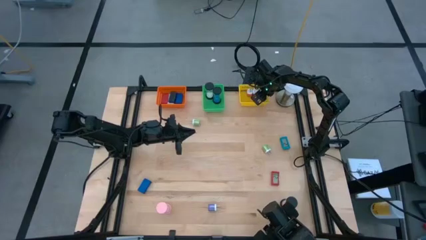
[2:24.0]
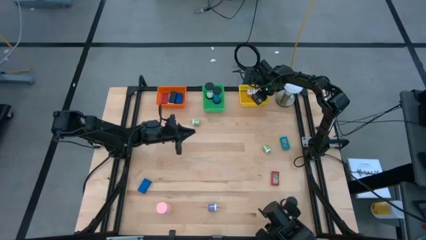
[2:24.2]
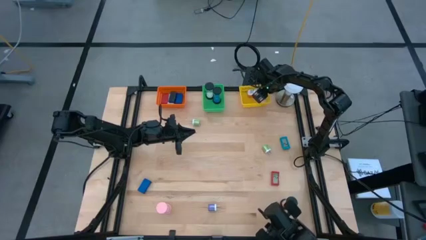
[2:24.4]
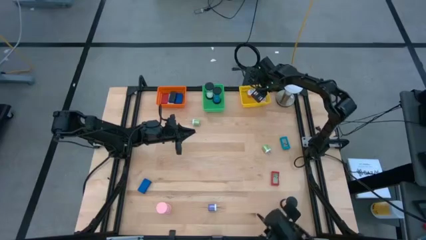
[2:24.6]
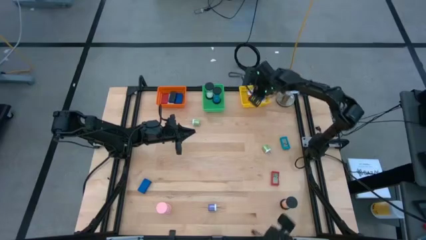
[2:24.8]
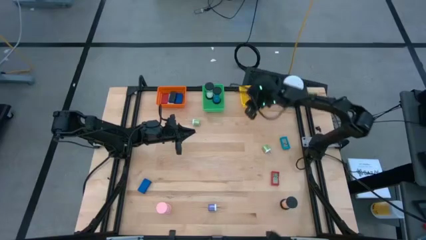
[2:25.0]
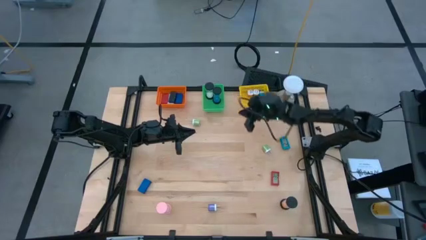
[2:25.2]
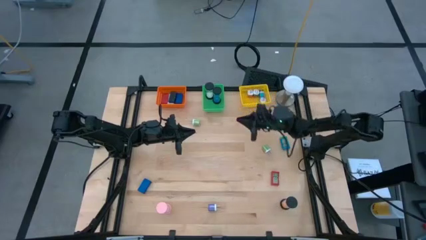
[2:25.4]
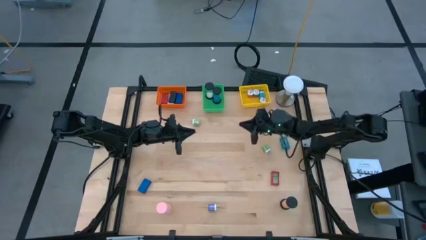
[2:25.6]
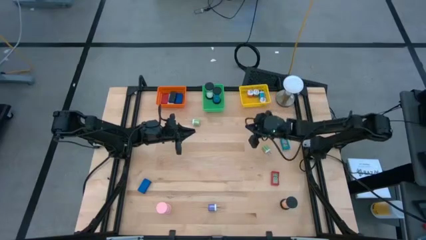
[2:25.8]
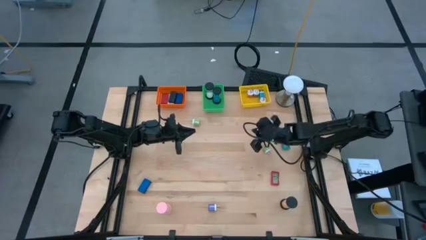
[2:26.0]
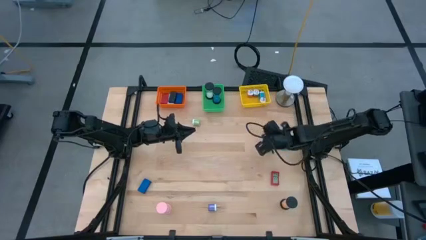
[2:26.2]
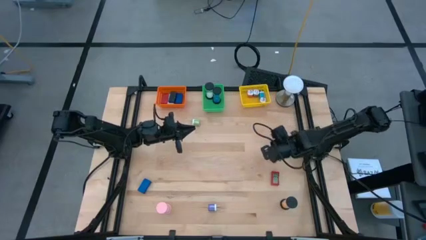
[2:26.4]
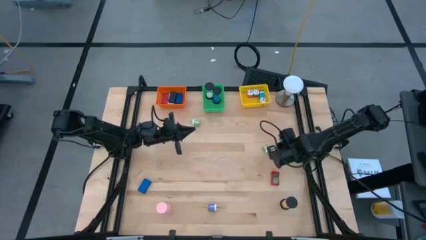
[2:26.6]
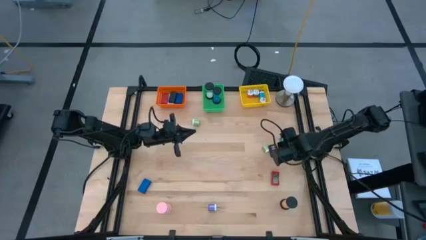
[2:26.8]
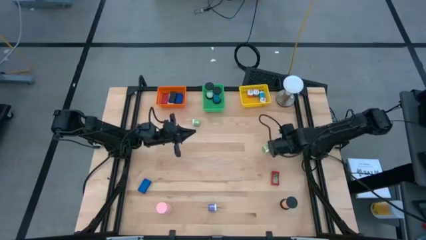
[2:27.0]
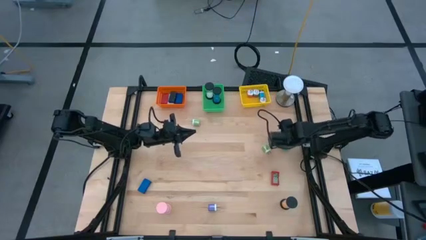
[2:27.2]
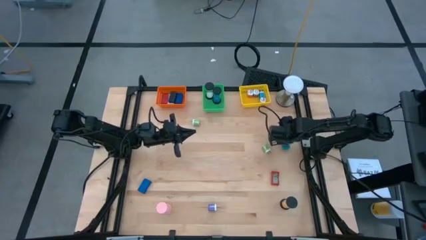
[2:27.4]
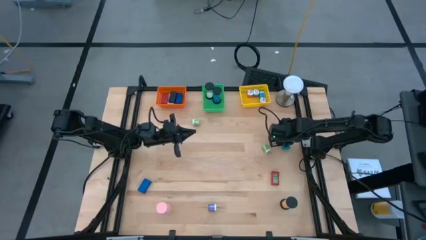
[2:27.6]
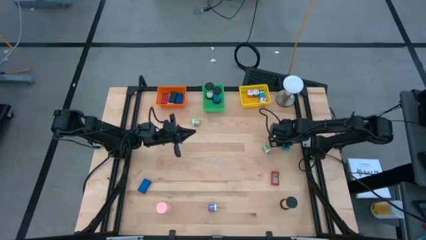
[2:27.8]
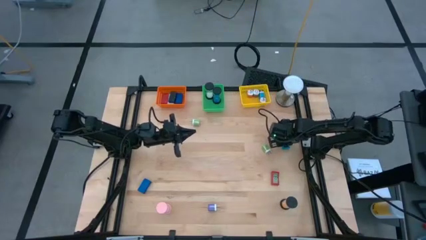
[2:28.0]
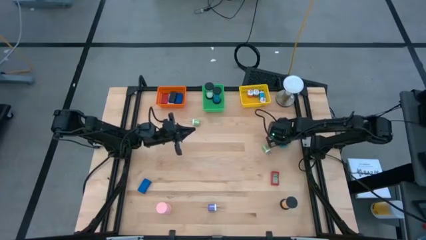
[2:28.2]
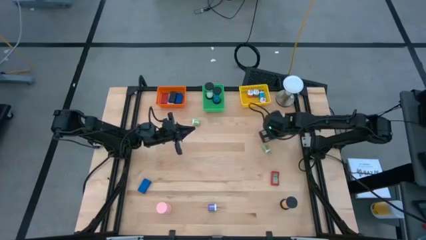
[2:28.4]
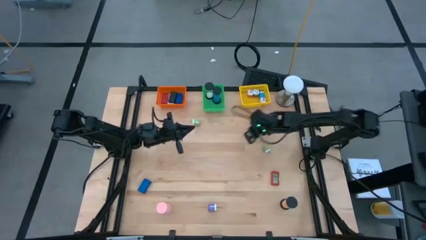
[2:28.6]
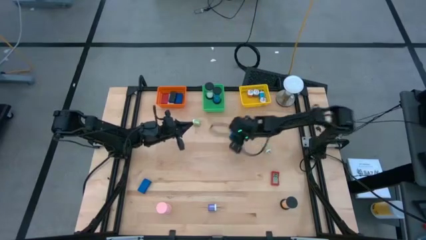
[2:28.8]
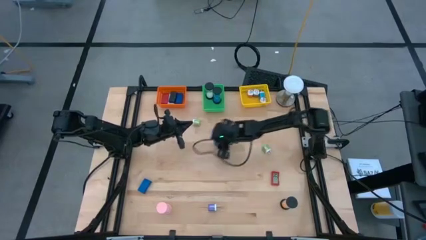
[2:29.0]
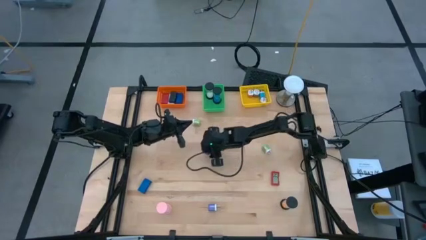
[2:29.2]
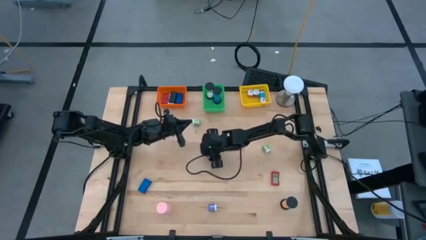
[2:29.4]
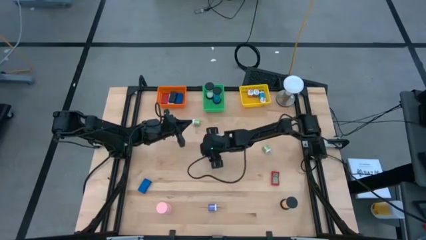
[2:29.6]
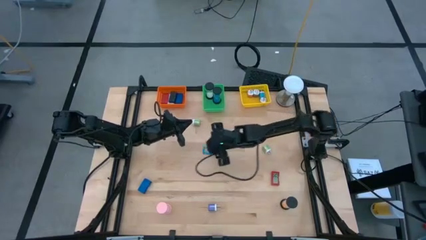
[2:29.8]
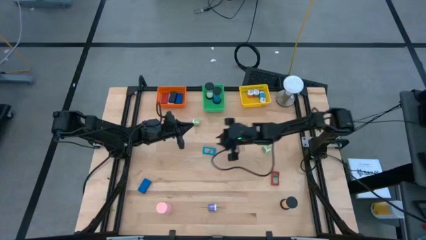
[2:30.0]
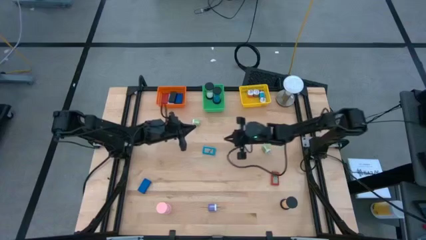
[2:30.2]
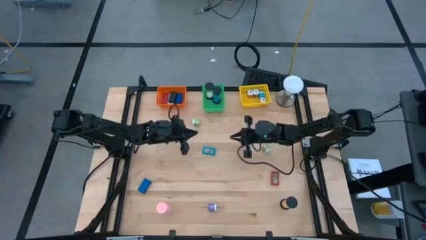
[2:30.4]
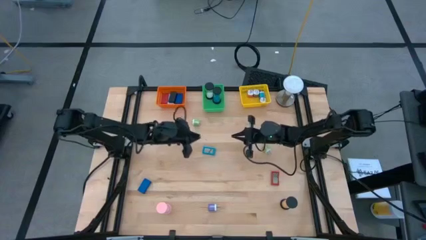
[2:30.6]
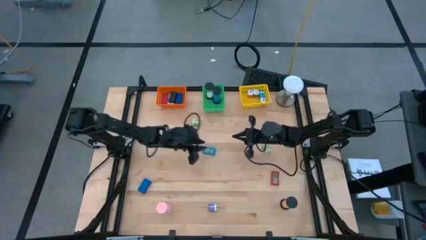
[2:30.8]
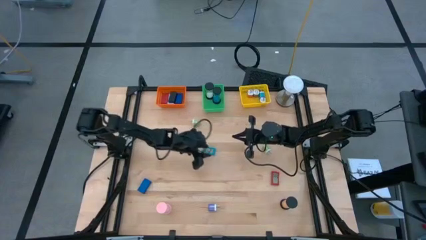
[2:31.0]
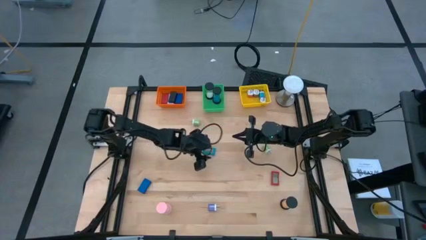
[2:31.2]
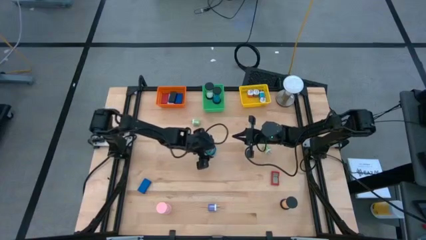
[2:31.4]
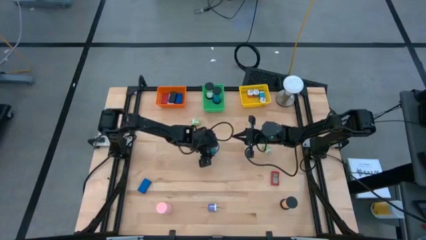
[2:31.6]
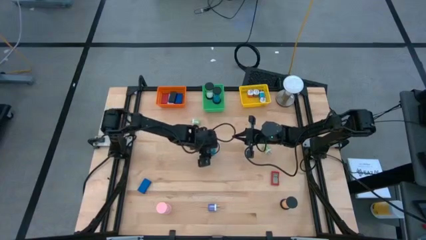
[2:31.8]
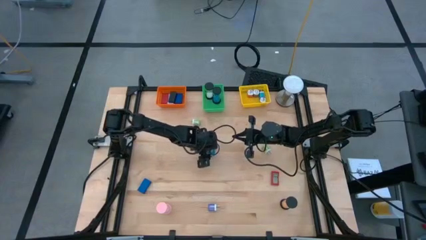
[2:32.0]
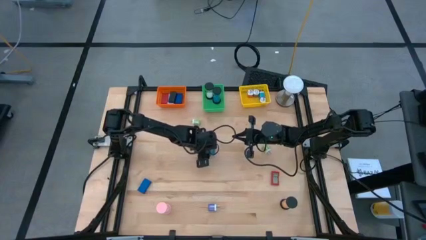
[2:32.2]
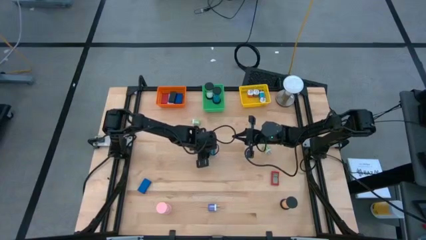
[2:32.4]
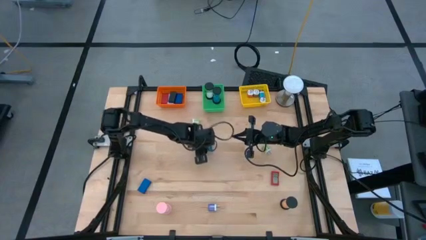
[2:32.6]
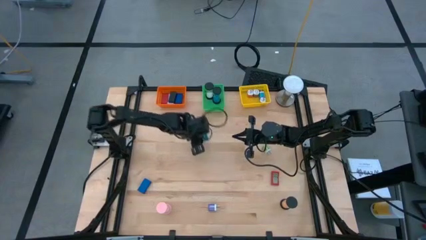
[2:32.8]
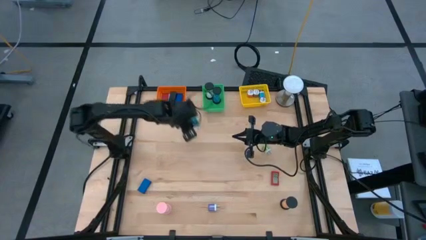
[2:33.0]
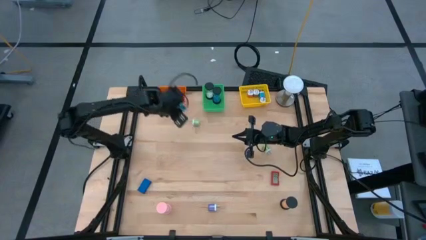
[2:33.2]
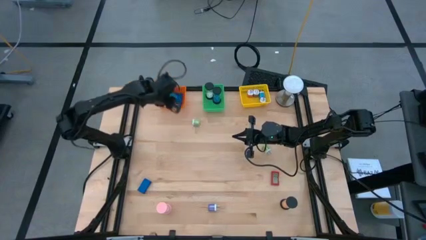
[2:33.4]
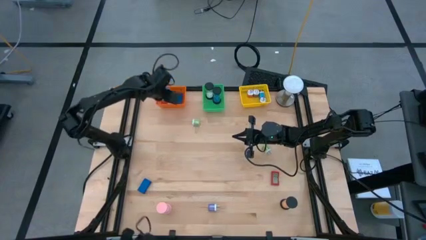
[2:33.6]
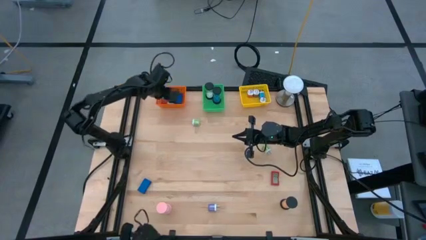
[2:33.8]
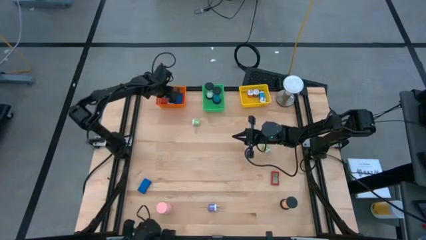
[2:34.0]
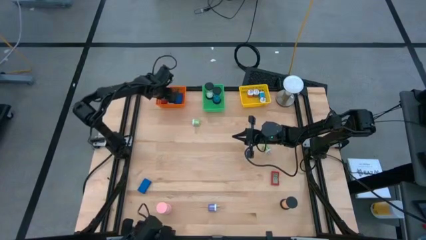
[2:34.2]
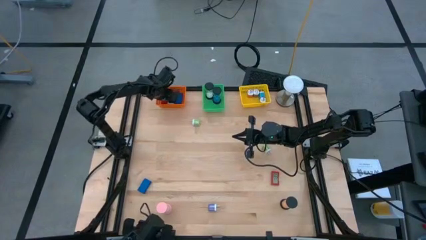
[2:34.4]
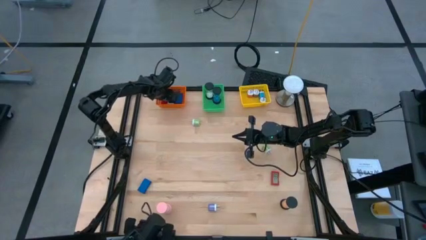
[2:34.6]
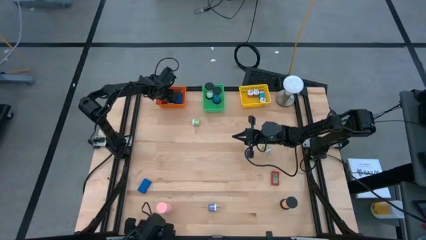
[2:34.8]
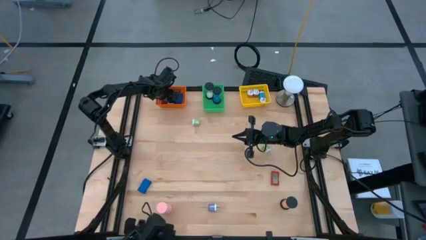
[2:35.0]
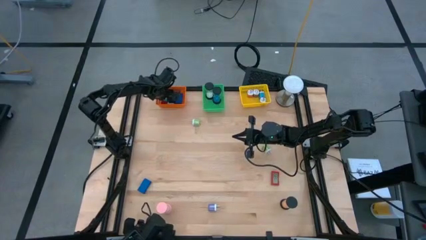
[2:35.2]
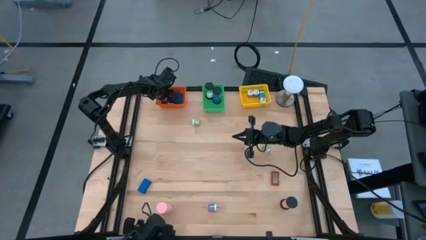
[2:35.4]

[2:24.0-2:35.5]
Task: Pick & Place Office items
Put the light blue digital clock into the orange bin
